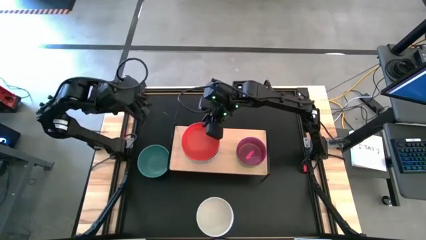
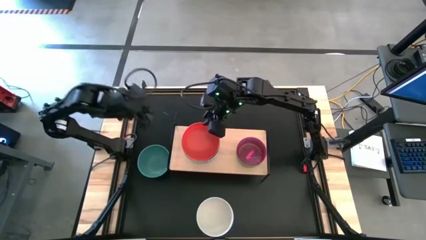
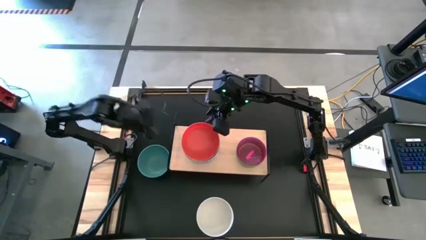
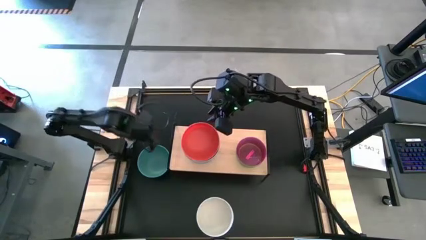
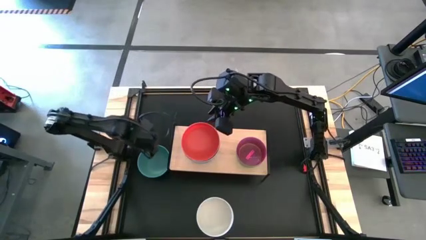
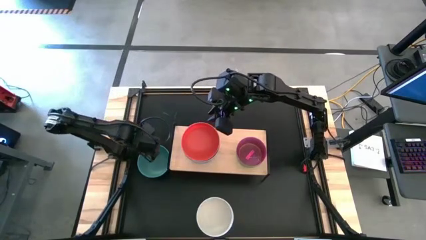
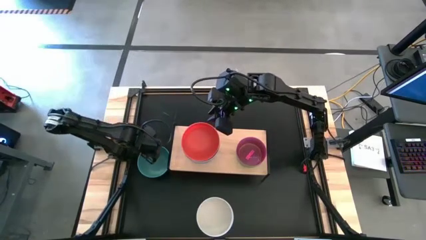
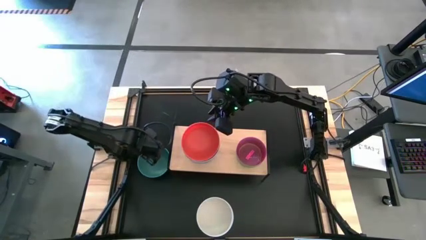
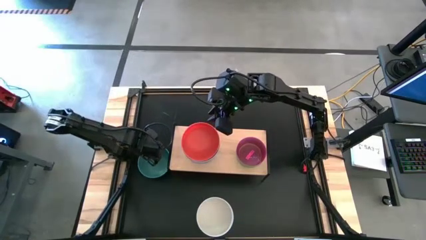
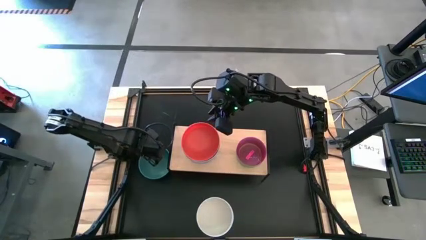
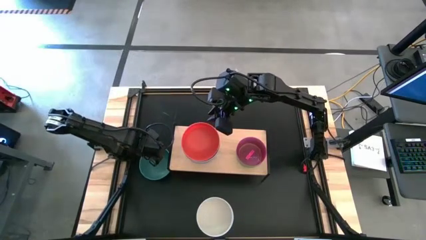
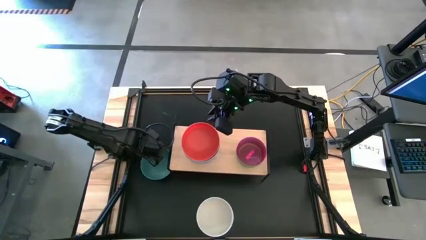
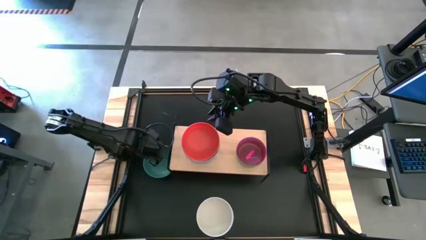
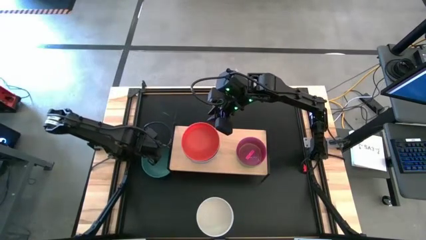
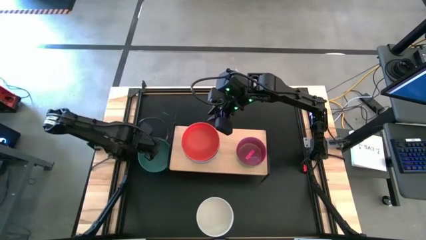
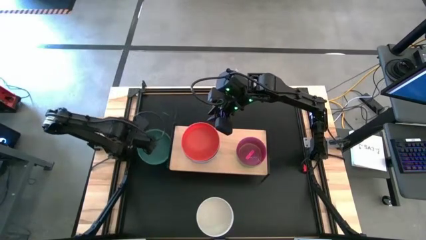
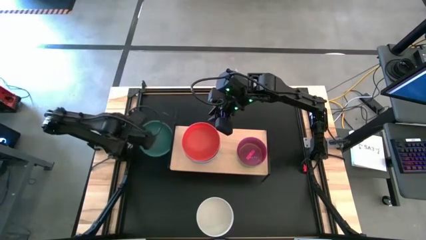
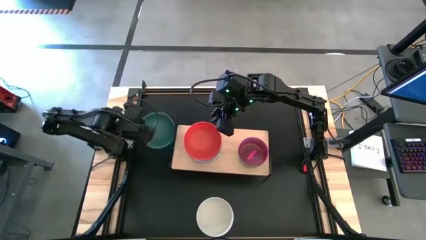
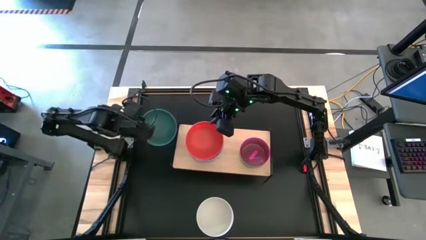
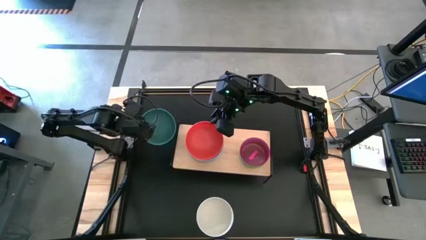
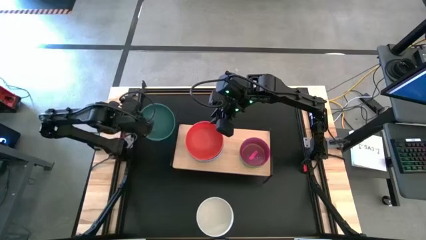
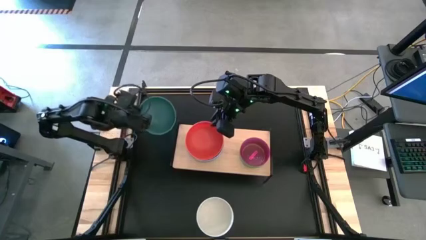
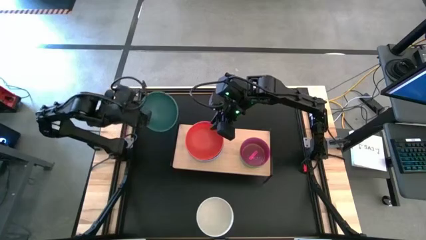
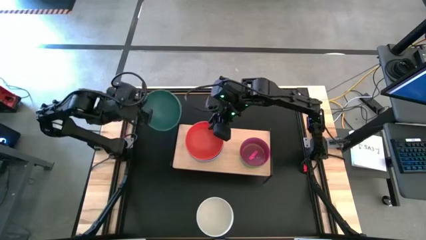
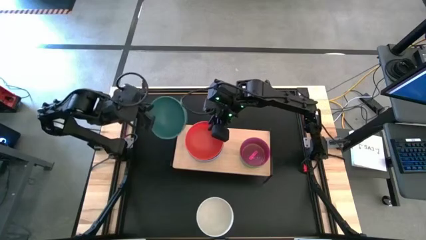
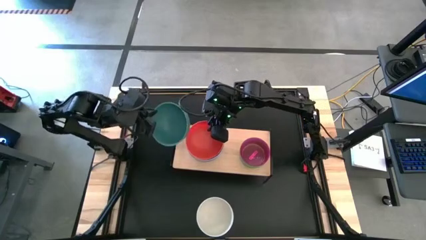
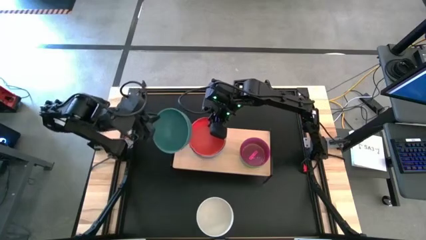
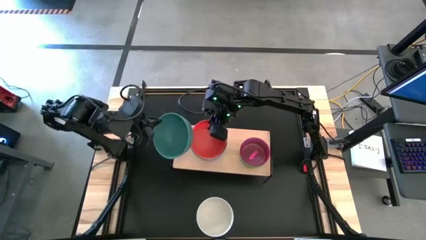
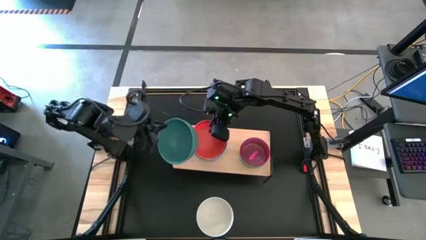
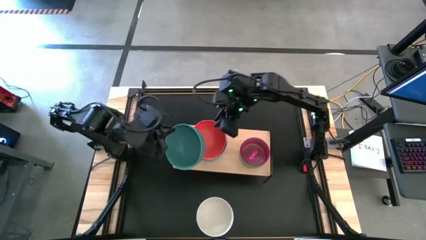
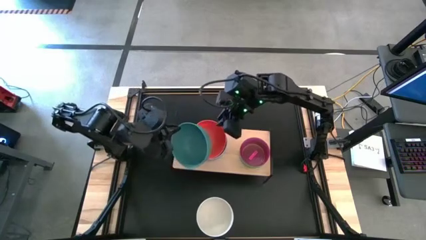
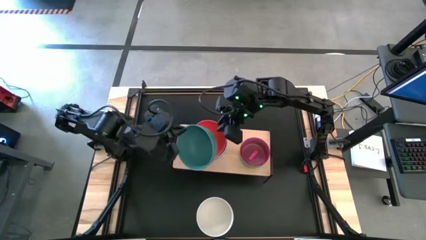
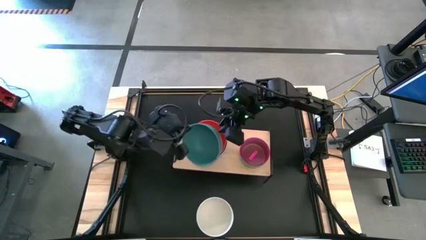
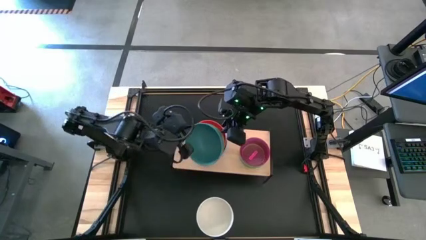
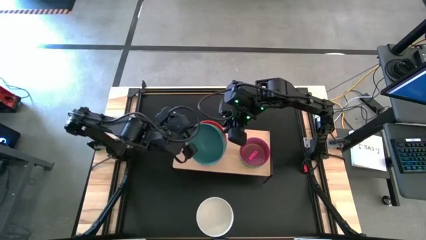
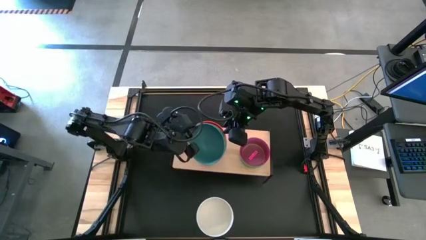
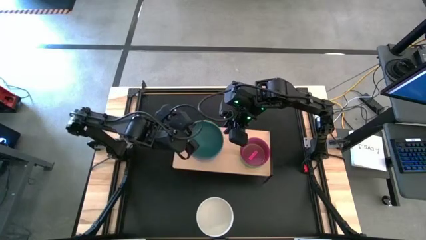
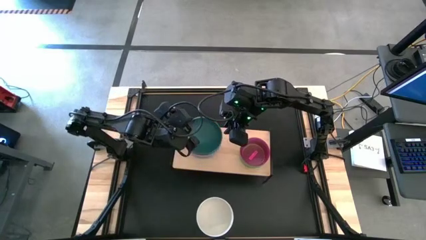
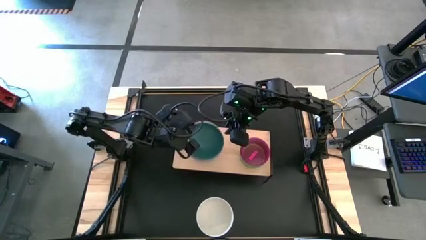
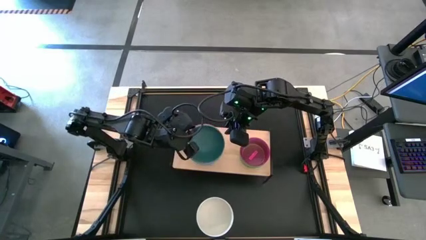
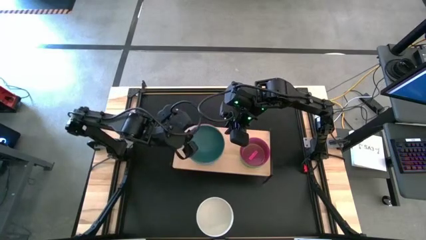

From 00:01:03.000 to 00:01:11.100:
Task: Place and stack bowls onto a shelf
Stack the big dark green bowl on top of the big orange bowl on the shelf

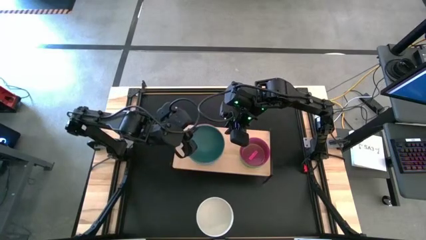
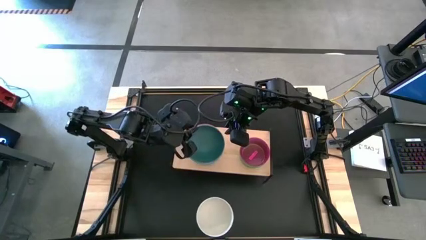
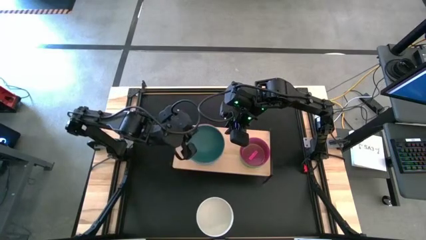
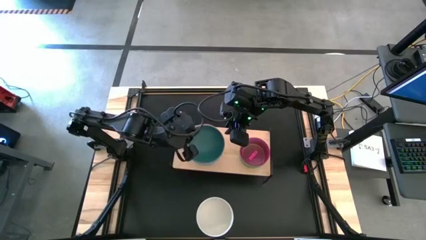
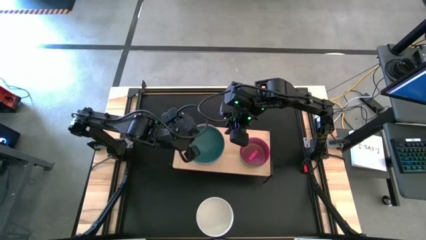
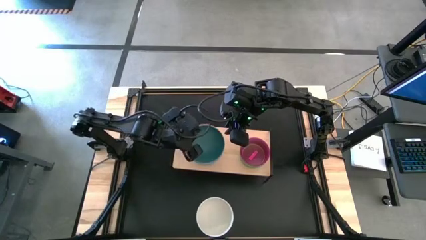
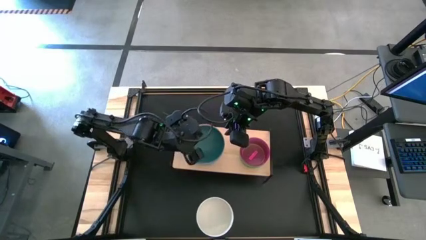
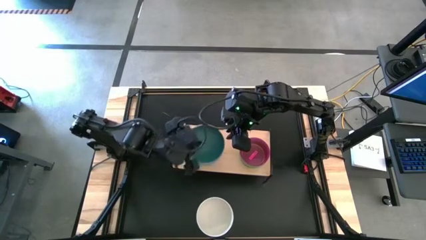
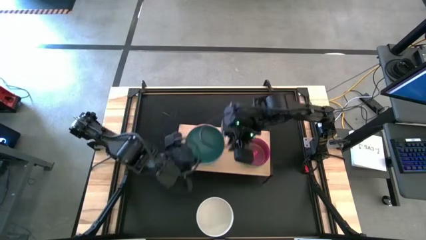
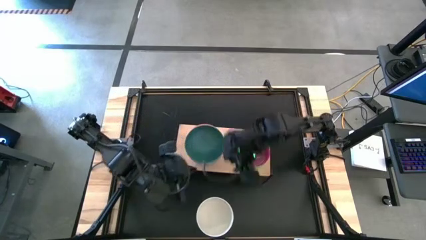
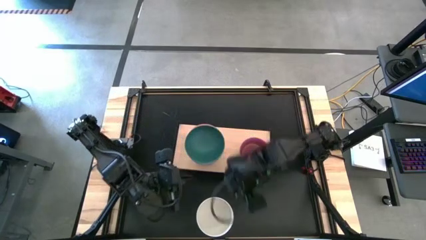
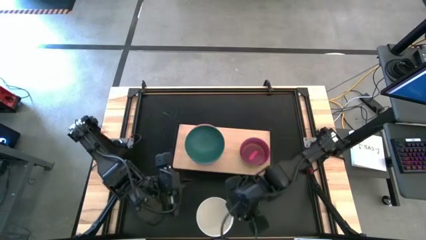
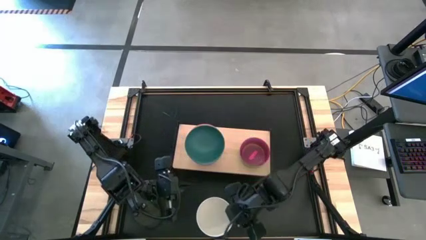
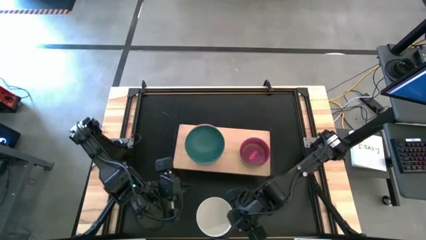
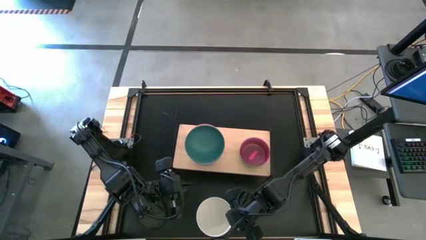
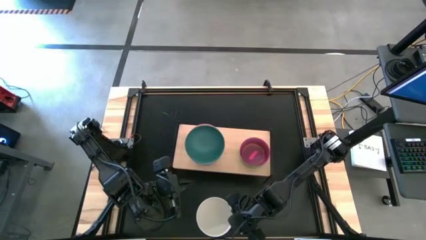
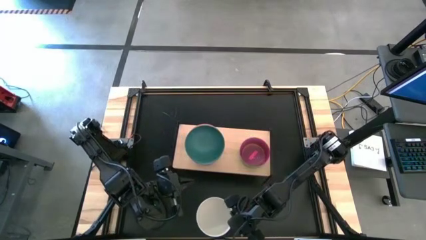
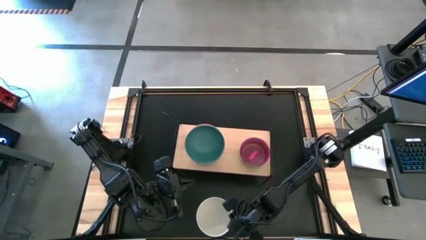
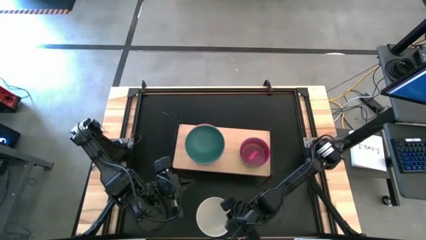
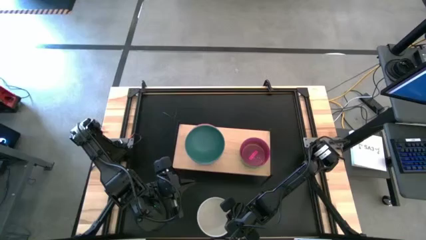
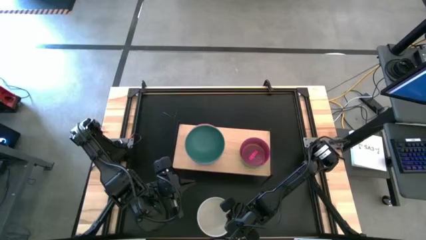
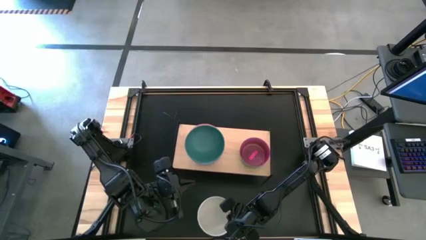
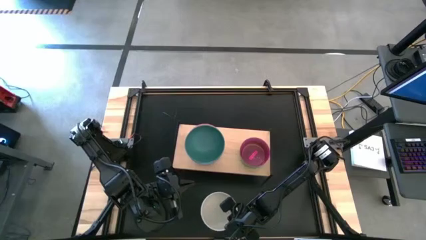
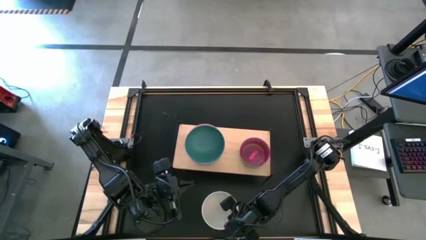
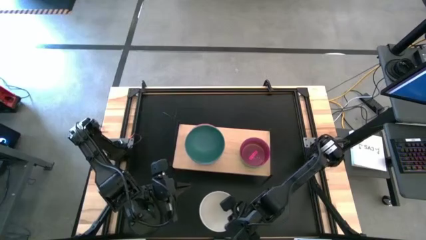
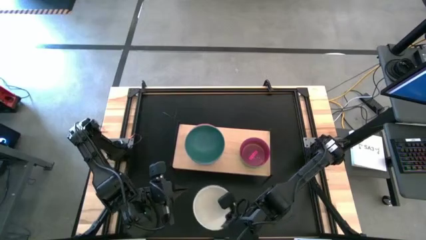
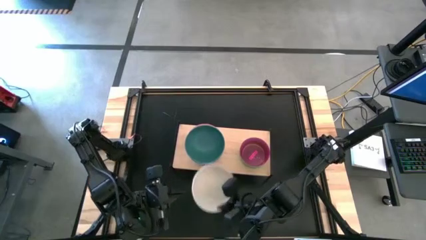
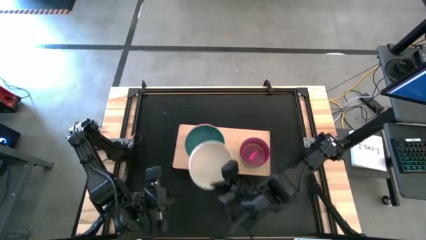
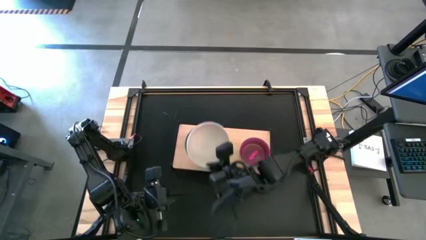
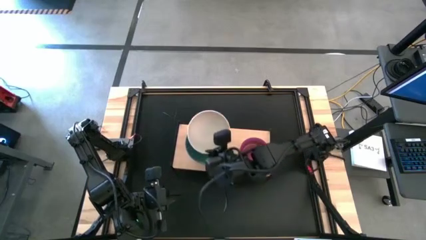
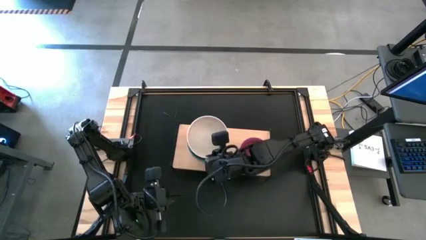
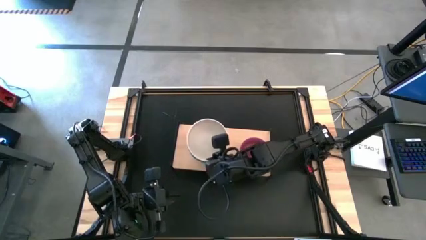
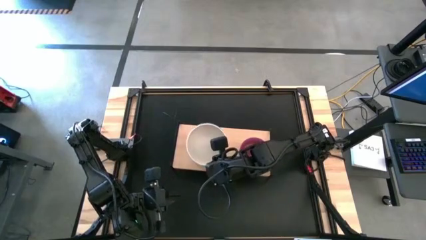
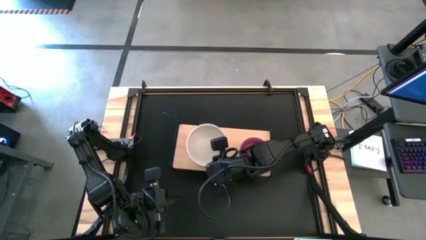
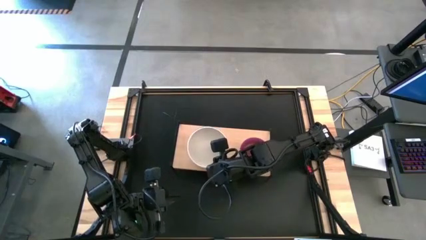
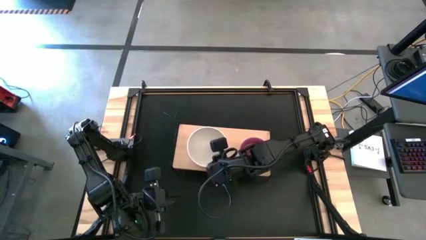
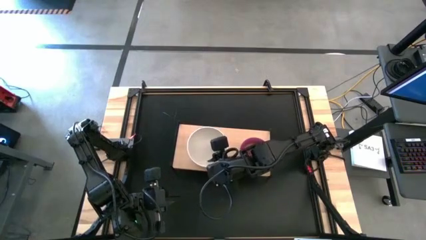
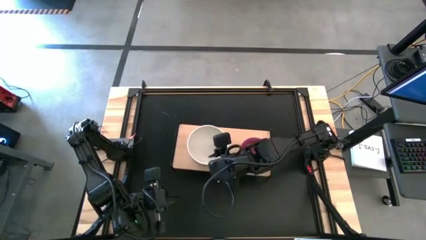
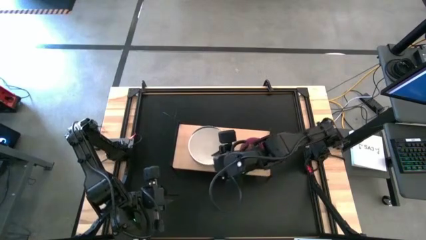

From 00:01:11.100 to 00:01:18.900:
Stack the big white bowl on top of the big dark green bowl on the shelf
